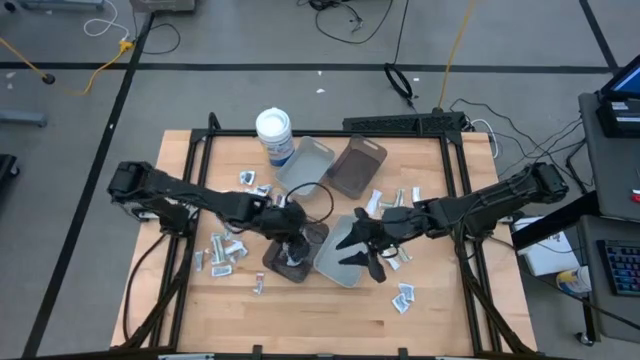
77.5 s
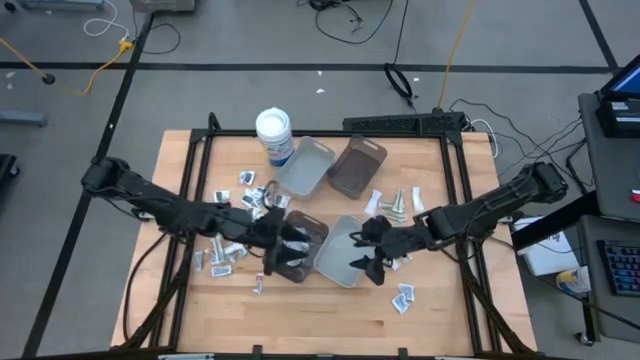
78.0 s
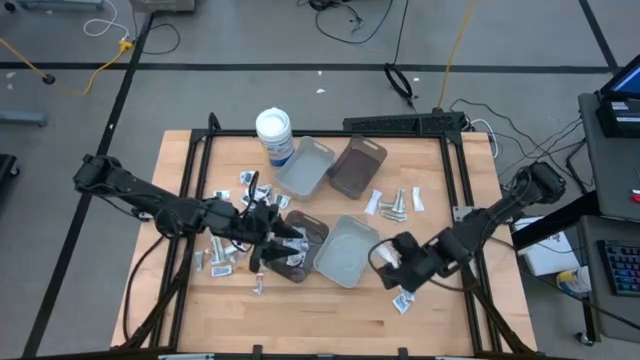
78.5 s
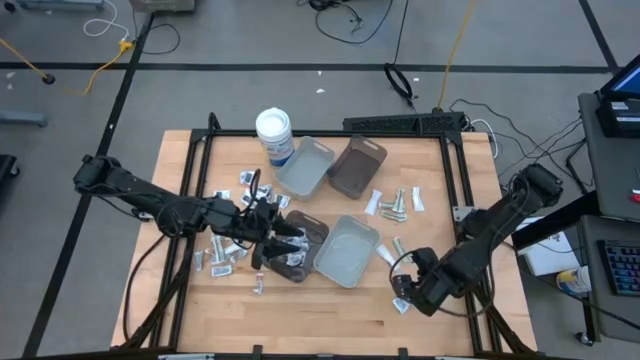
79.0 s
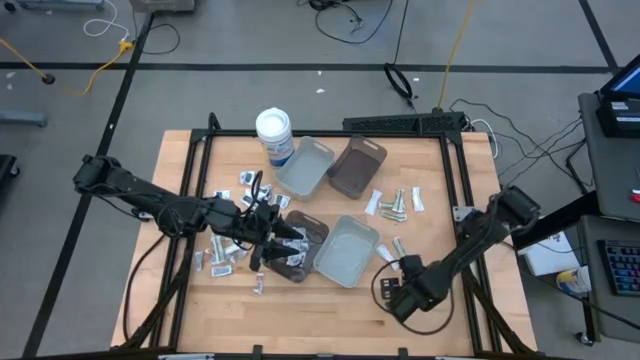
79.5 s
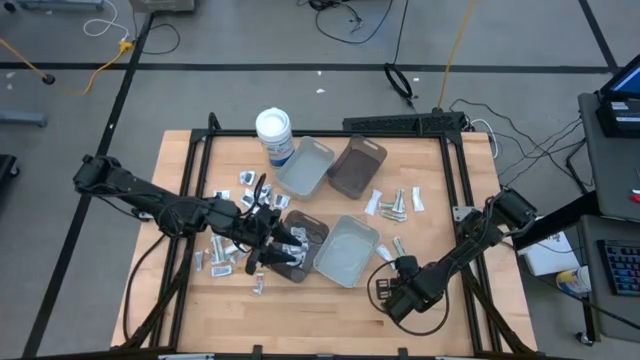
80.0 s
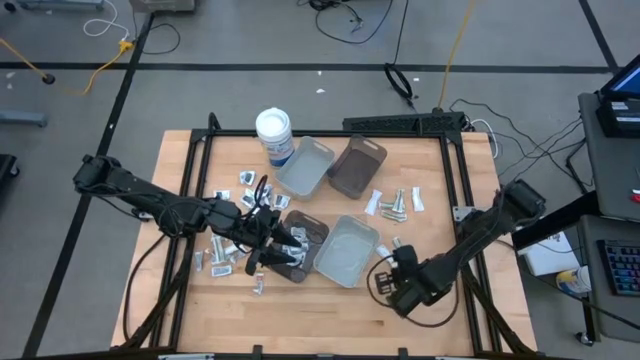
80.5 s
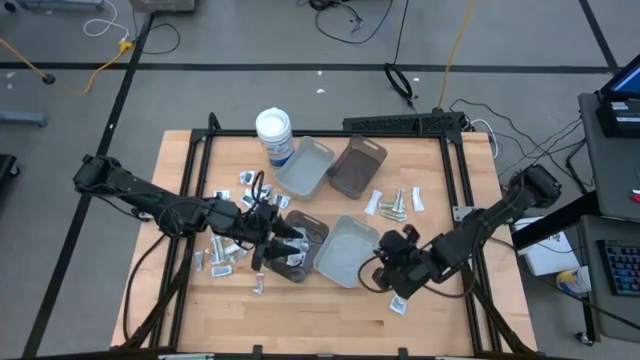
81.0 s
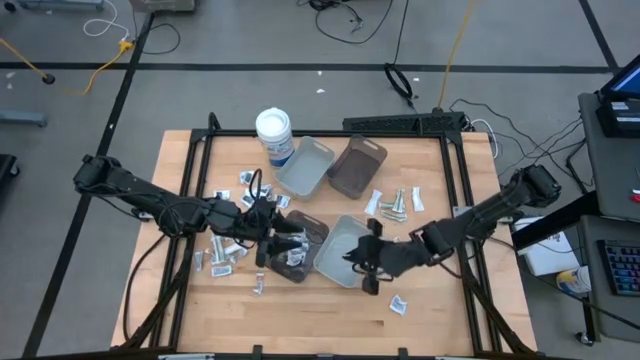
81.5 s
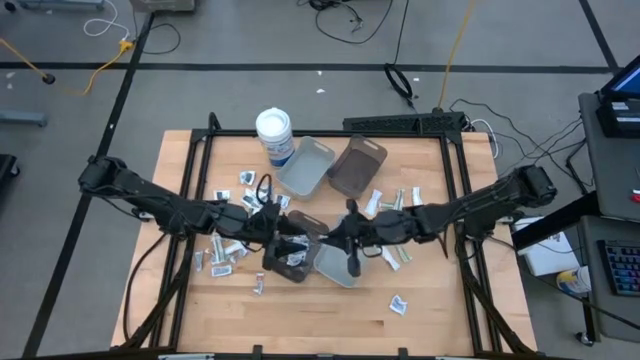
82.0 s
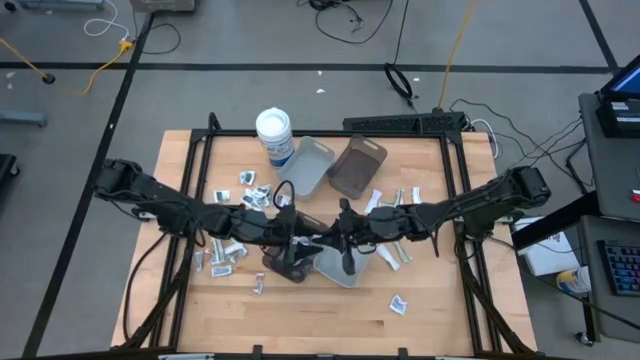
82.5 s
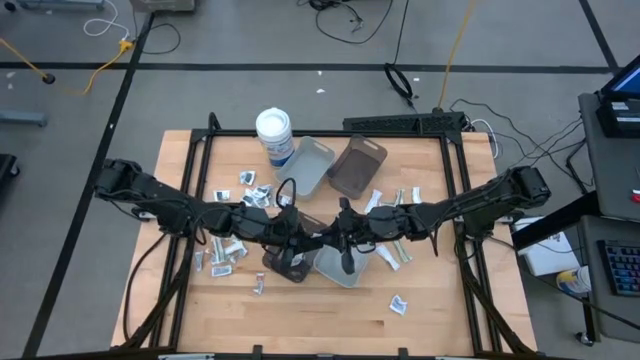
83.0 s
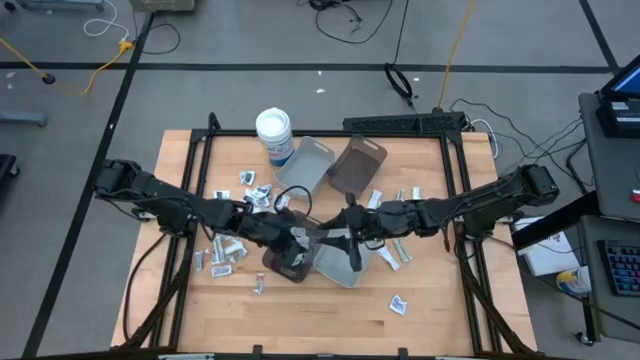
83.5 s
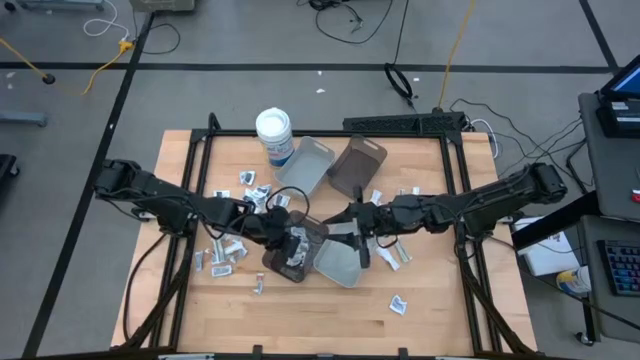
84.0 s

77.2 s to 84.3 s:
Task: Pick & Place First Aid Supplies
Put the blue alcohol pad into the bottom black bin

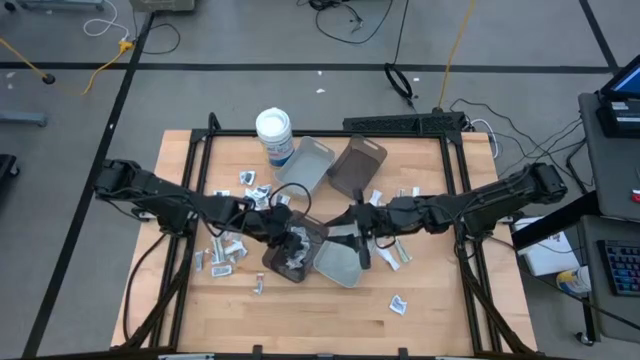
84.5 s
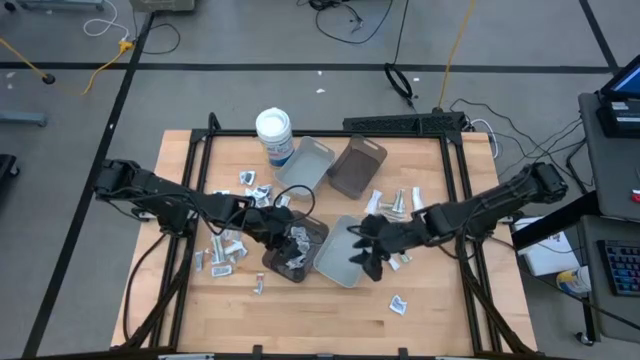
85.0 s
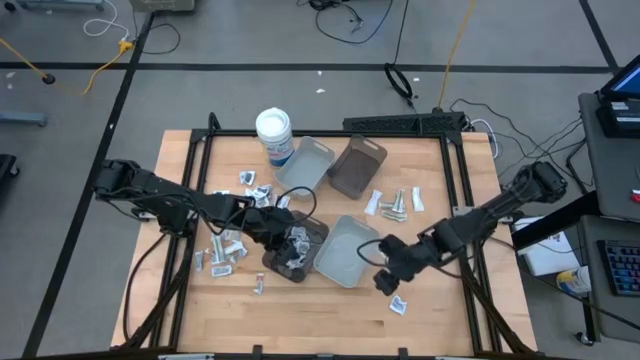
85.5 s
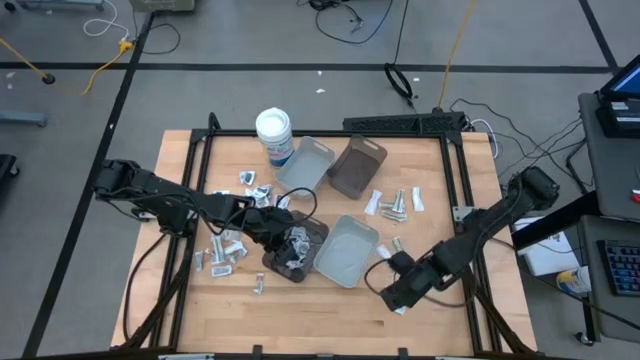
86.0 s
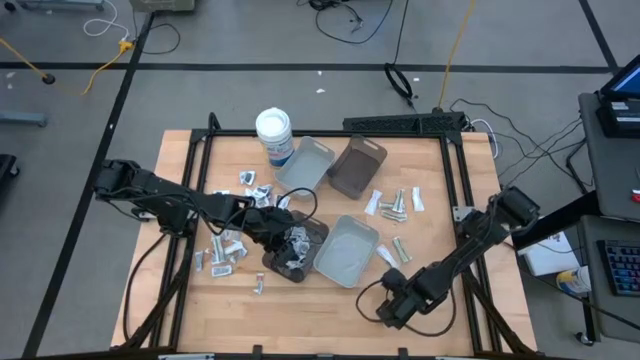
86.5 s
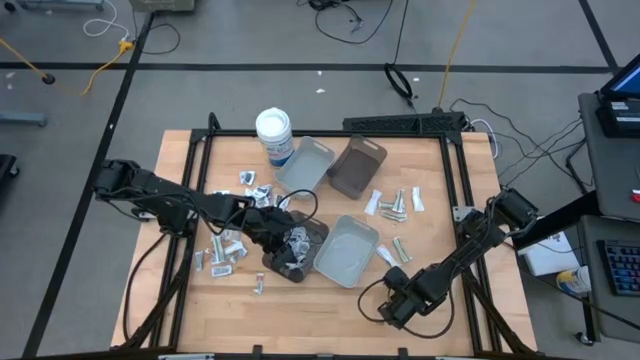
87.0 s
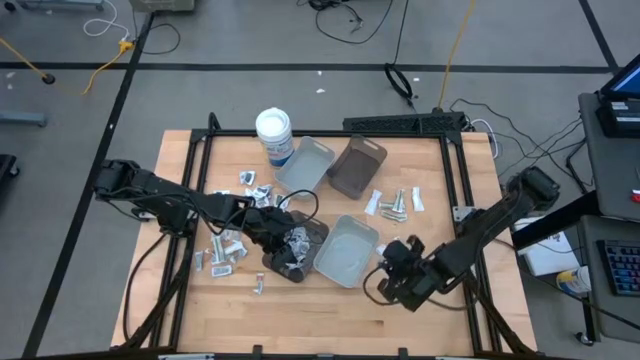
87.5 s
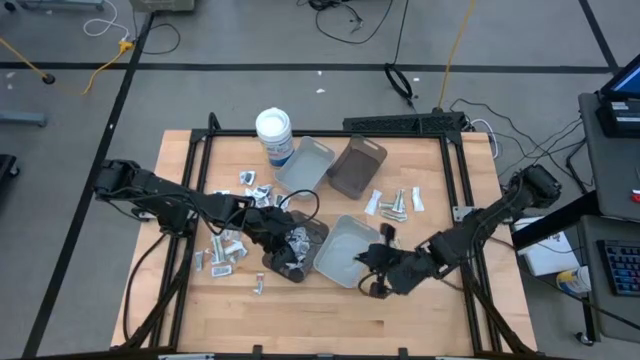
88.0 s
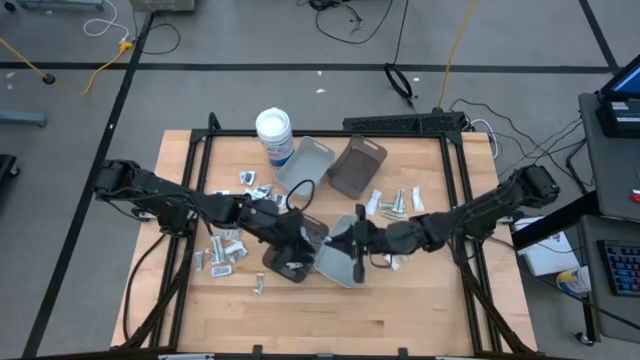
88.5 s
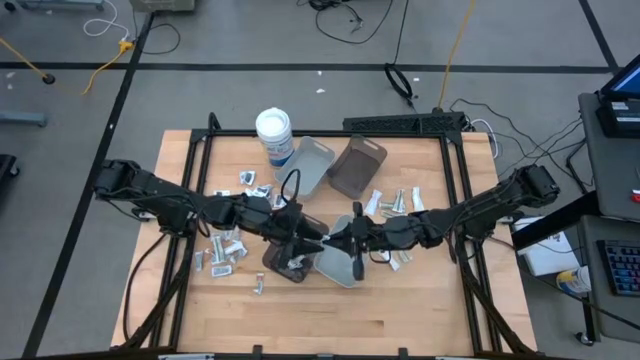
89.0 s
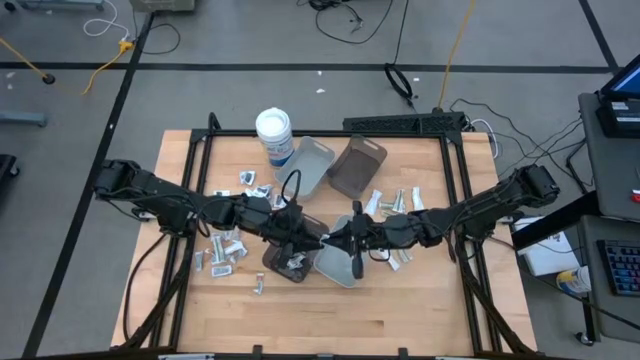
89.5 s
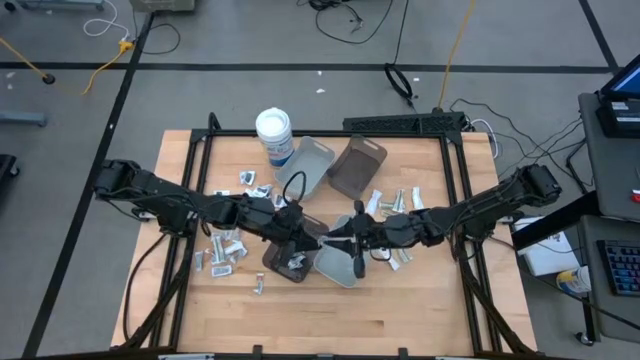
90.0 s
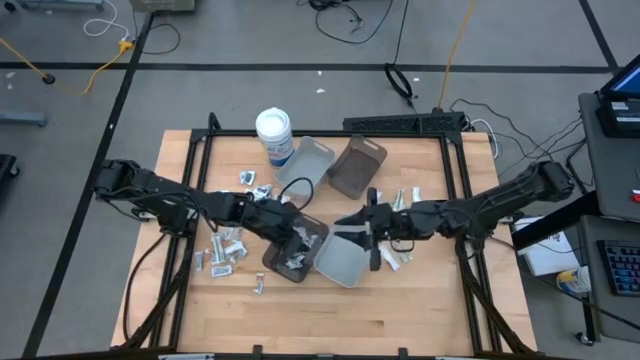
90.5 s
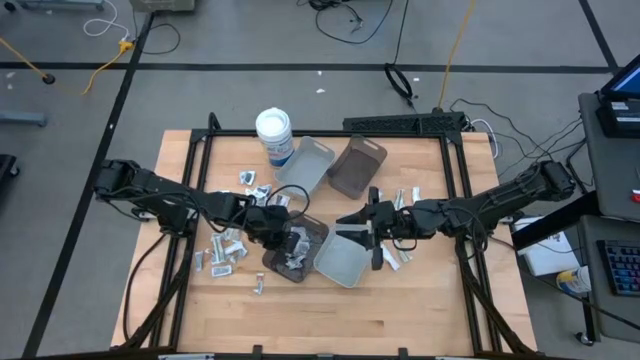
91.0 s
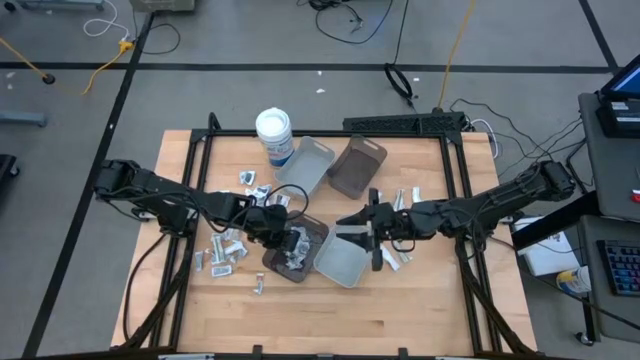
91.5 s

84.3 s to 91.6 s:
Put the blue alcohol pad into the bottom black bin

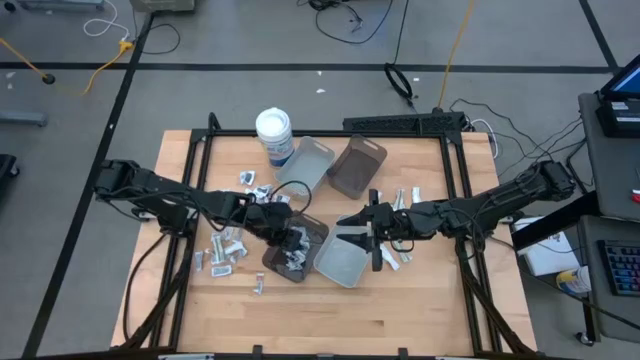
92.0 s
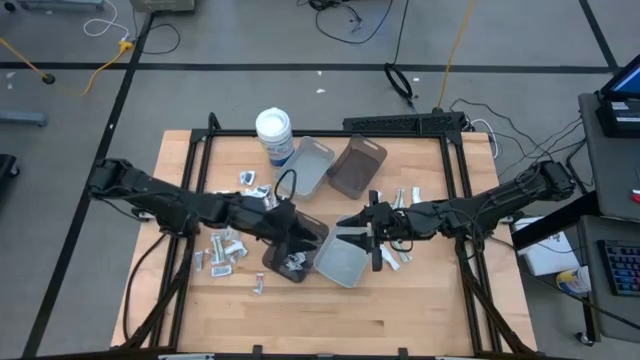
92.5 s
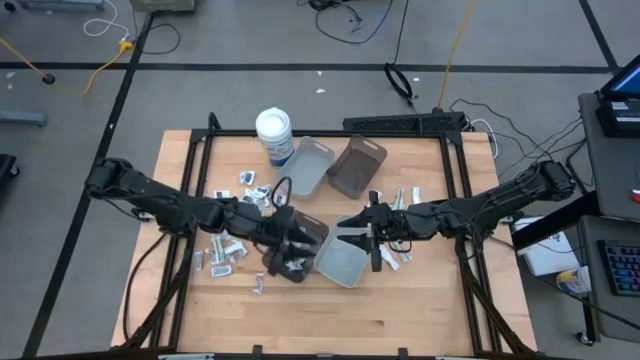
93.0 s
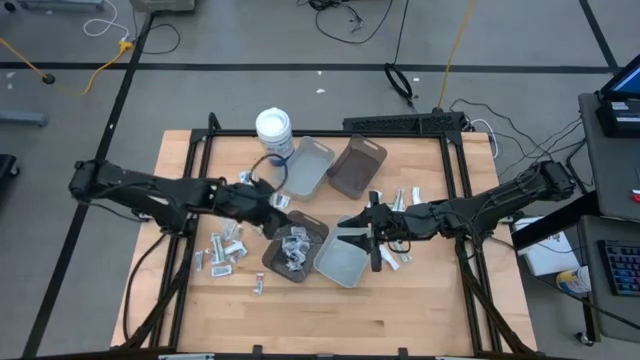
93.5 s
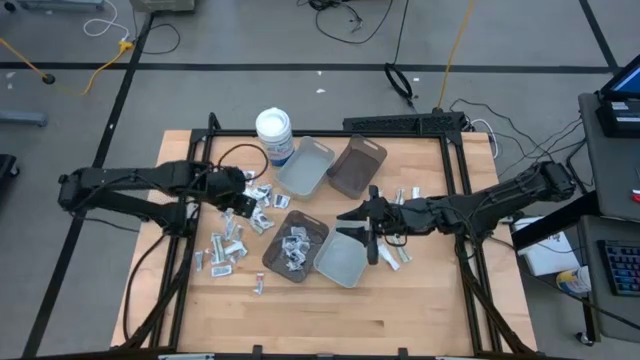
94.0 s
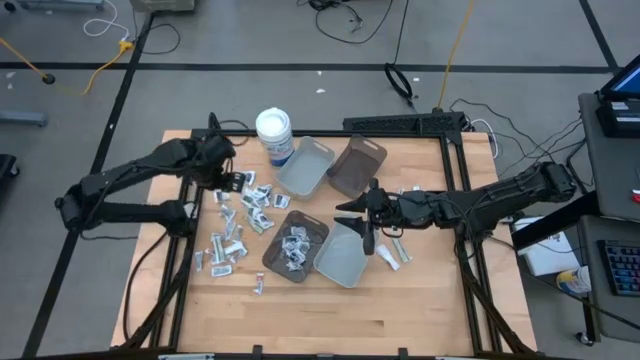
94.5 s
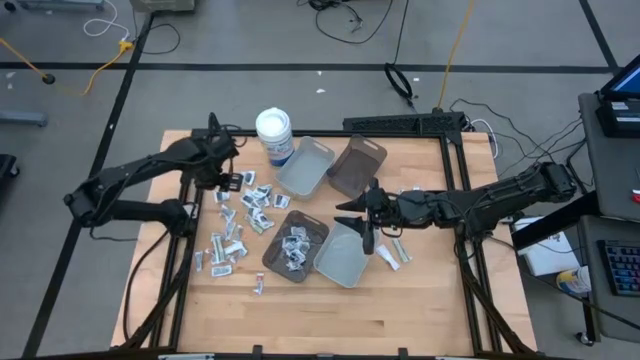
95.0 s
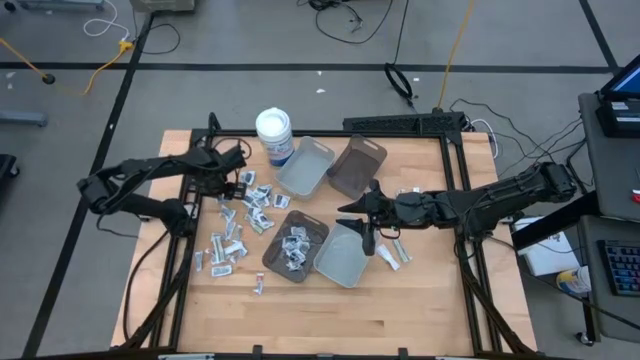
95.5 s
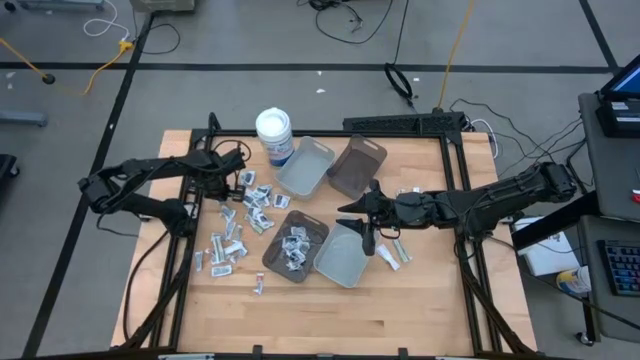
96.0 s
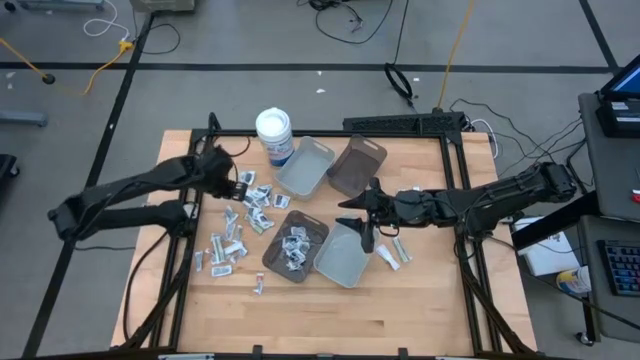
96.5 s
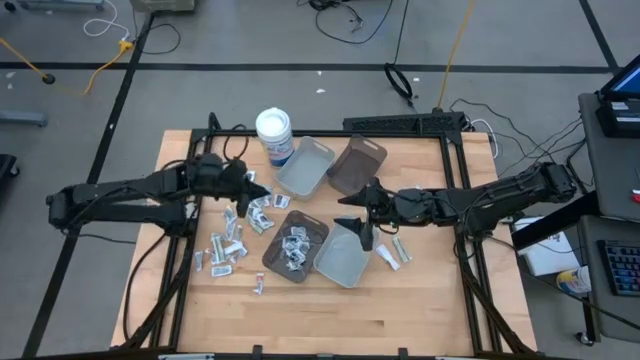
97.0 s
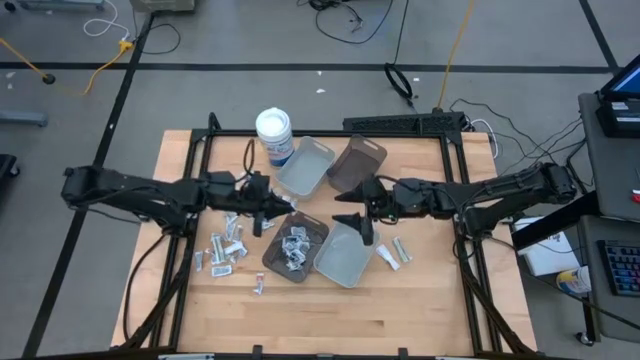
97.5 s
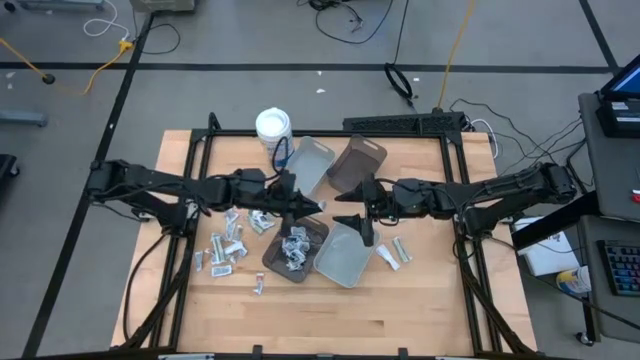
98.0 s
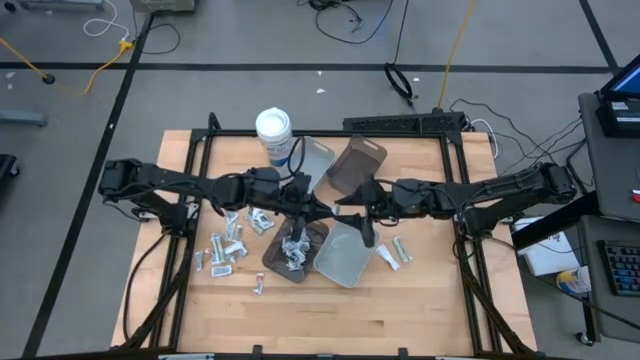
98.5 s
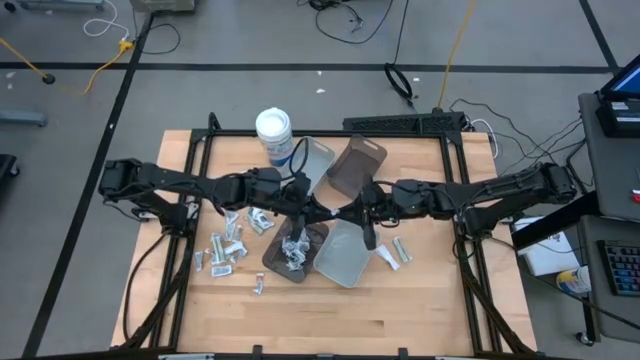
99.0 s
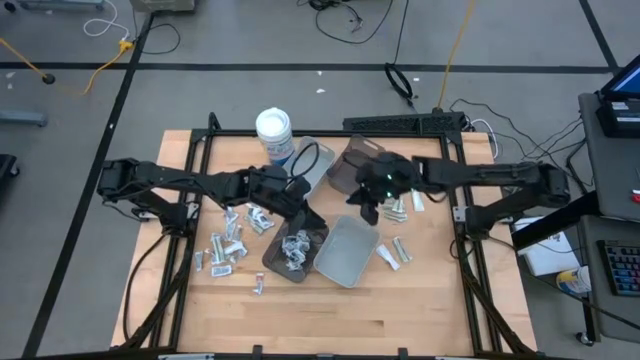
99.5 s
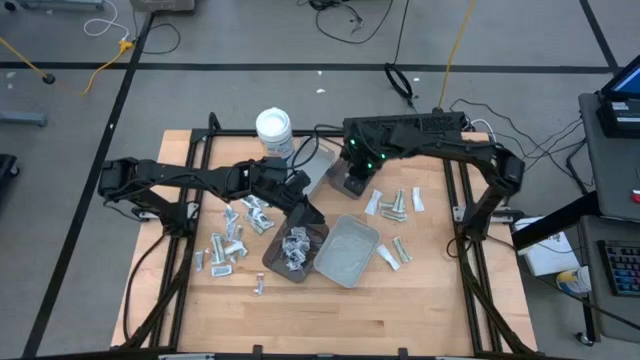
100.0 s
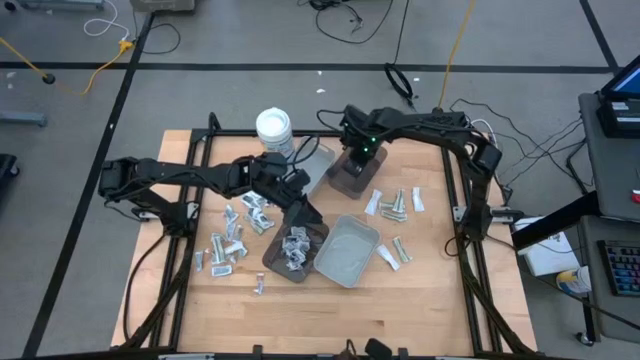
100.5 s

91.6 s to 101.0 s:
Put the black towelette pack into the top black bin
